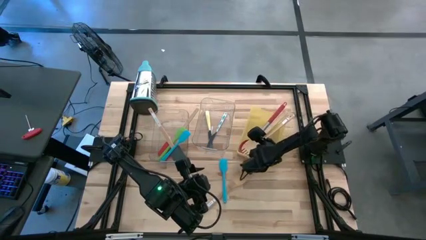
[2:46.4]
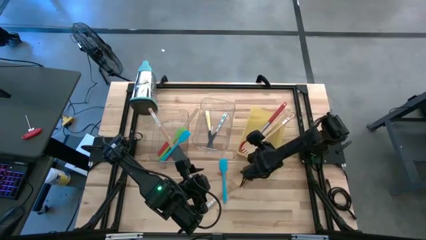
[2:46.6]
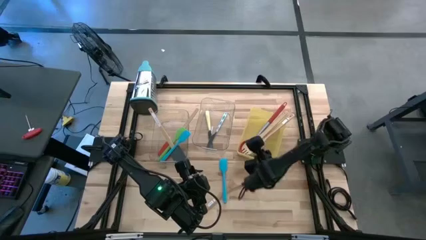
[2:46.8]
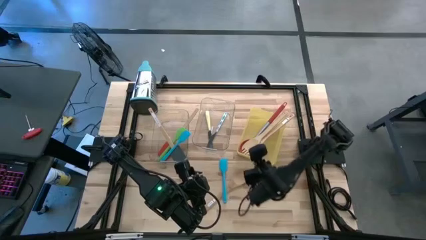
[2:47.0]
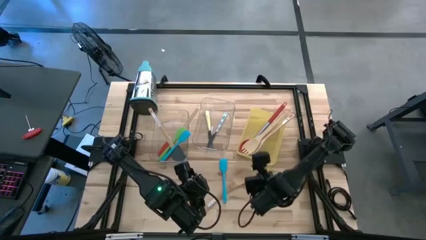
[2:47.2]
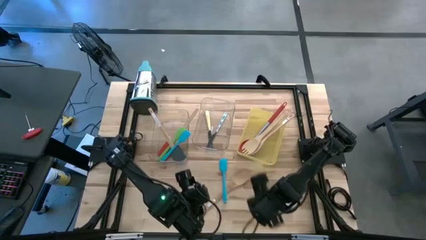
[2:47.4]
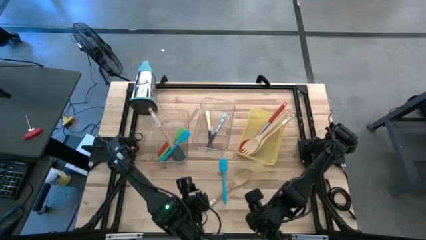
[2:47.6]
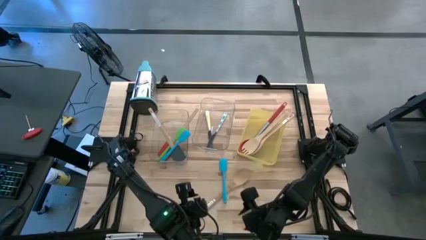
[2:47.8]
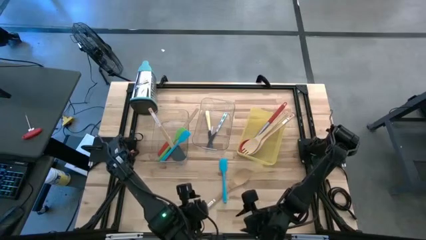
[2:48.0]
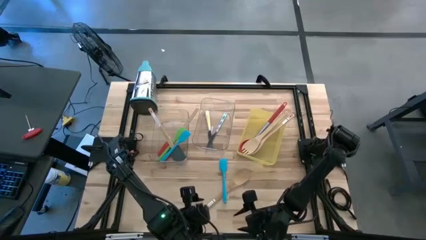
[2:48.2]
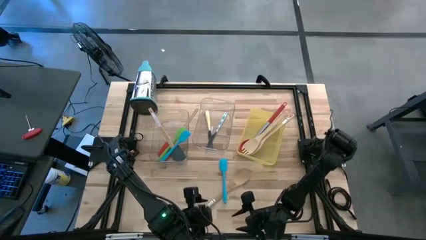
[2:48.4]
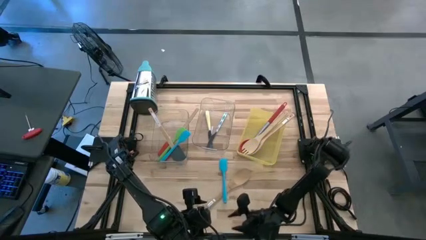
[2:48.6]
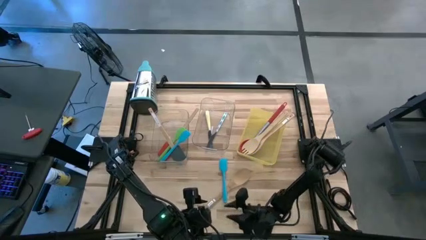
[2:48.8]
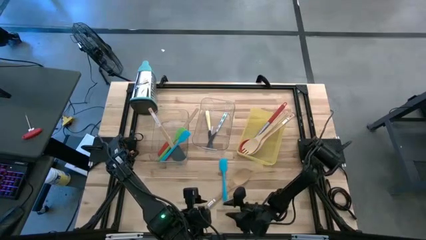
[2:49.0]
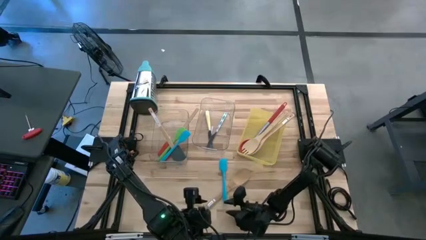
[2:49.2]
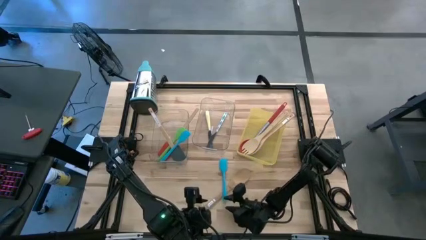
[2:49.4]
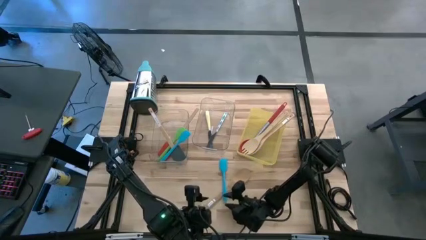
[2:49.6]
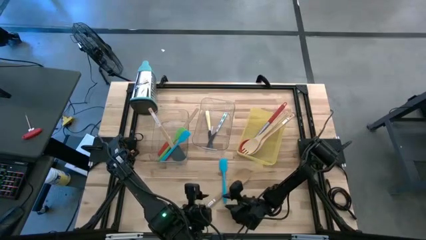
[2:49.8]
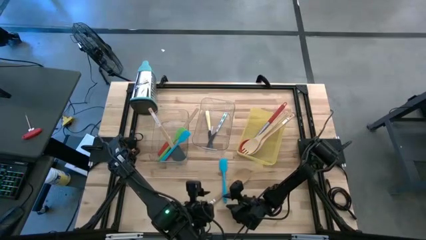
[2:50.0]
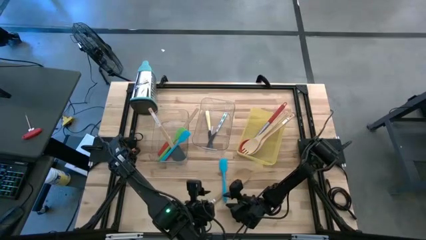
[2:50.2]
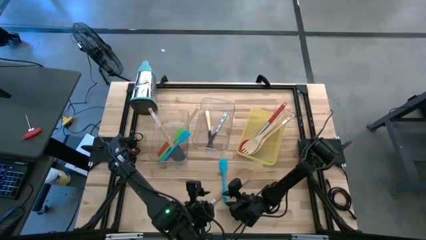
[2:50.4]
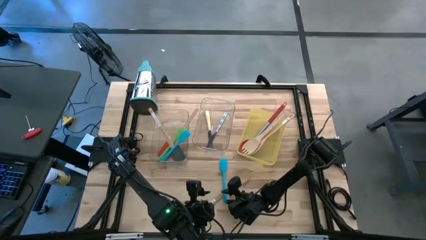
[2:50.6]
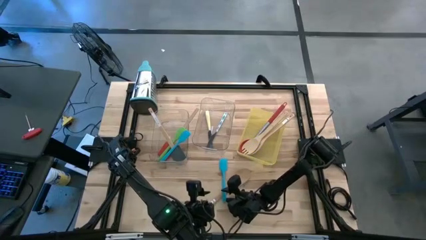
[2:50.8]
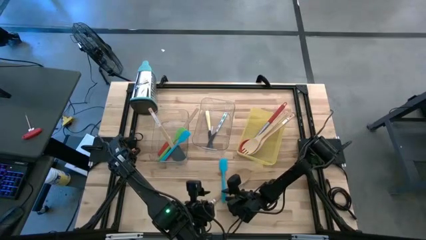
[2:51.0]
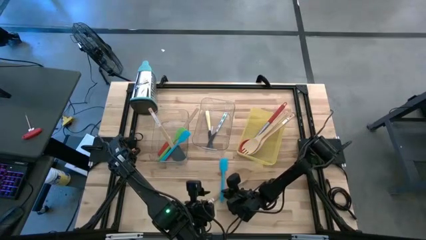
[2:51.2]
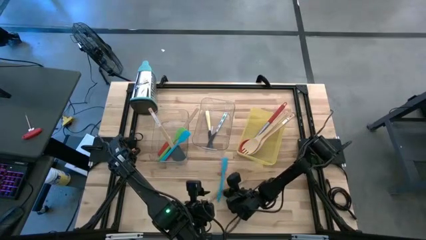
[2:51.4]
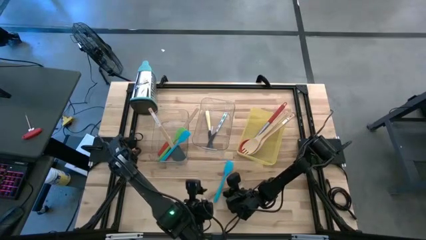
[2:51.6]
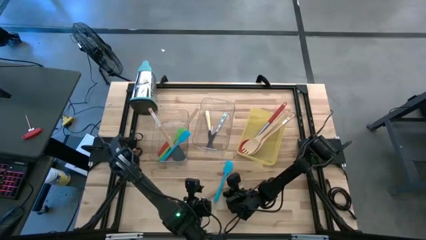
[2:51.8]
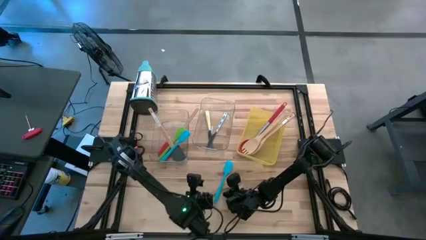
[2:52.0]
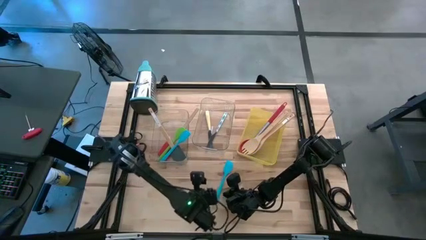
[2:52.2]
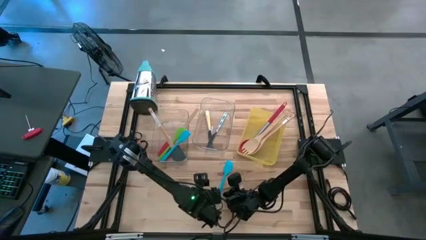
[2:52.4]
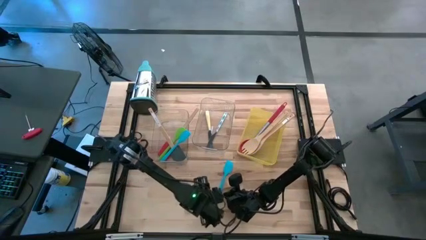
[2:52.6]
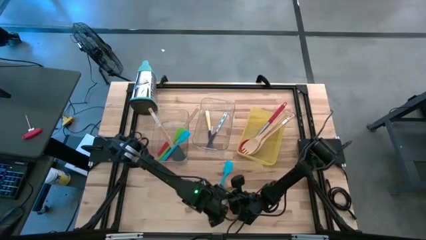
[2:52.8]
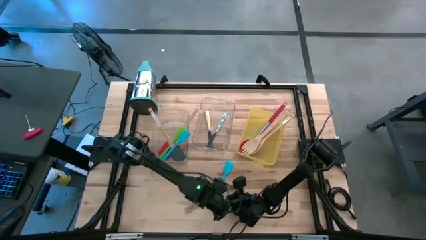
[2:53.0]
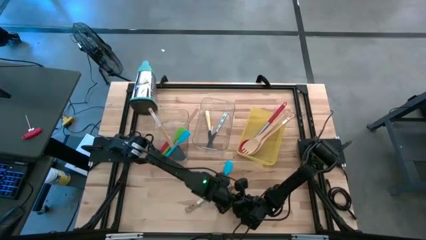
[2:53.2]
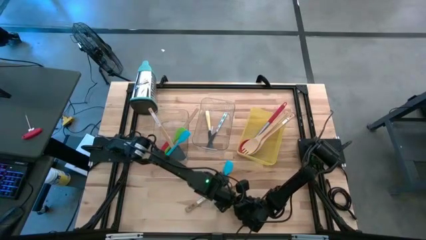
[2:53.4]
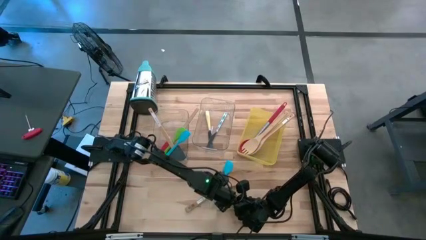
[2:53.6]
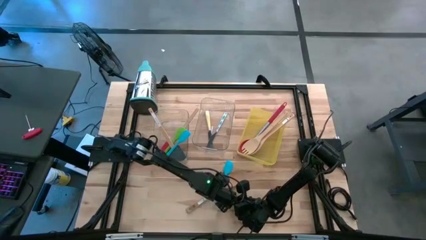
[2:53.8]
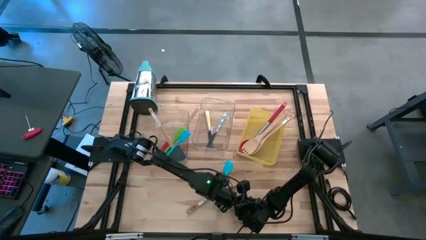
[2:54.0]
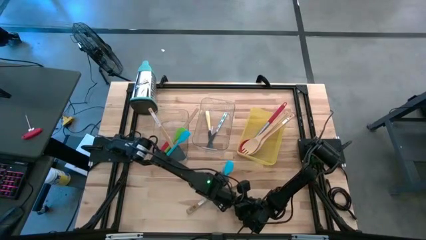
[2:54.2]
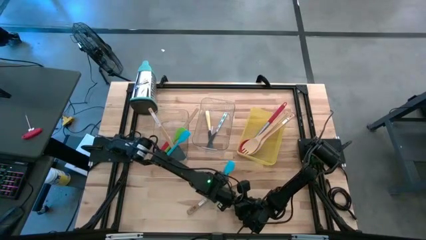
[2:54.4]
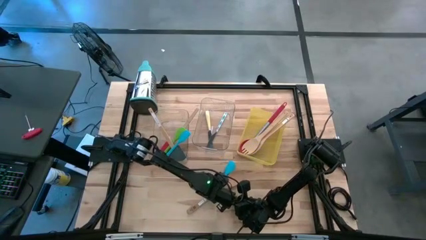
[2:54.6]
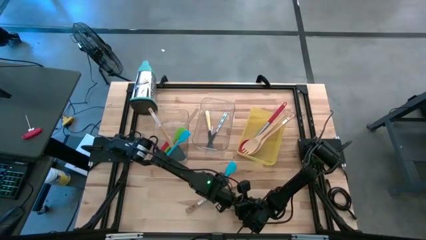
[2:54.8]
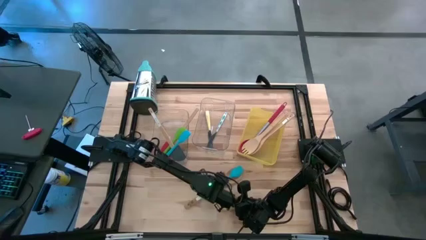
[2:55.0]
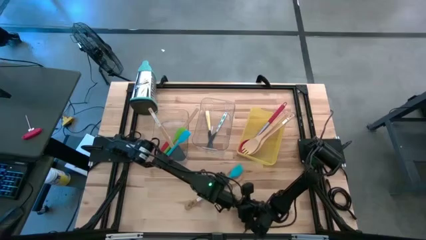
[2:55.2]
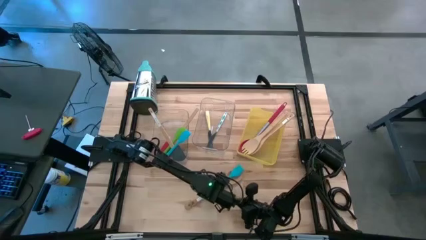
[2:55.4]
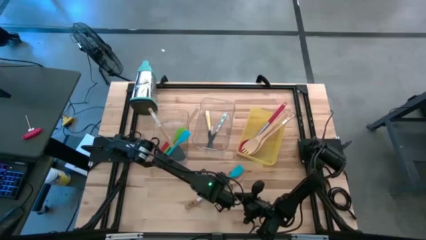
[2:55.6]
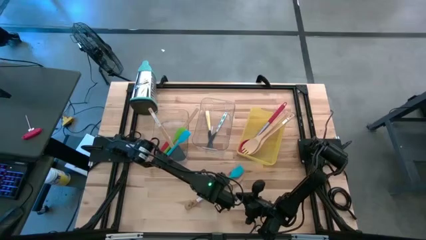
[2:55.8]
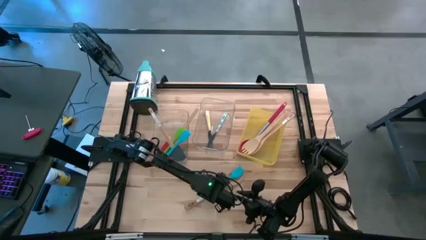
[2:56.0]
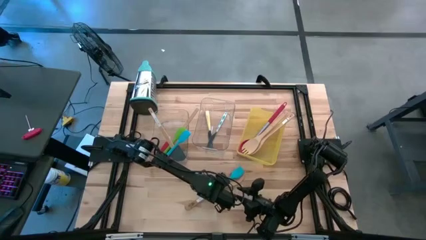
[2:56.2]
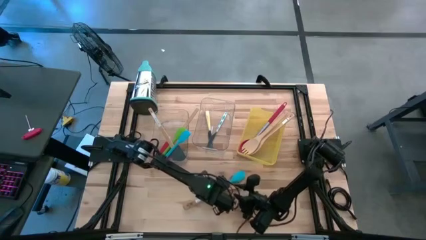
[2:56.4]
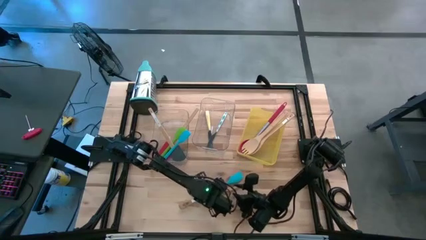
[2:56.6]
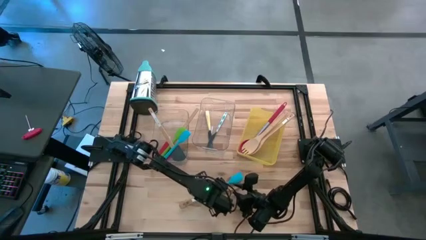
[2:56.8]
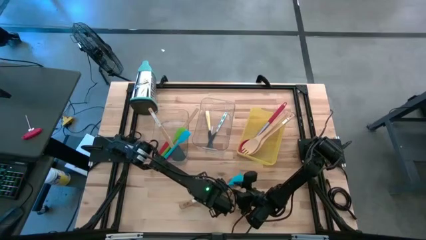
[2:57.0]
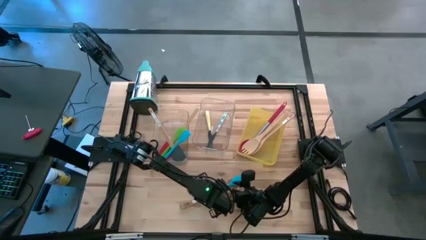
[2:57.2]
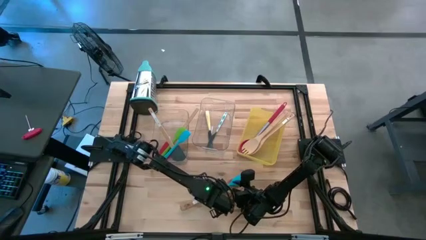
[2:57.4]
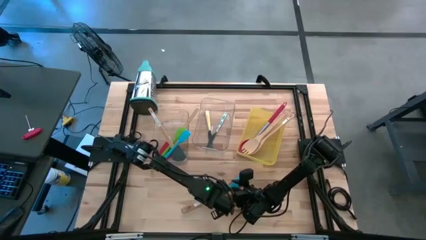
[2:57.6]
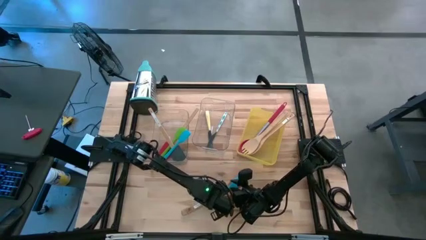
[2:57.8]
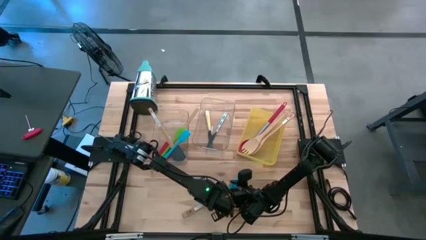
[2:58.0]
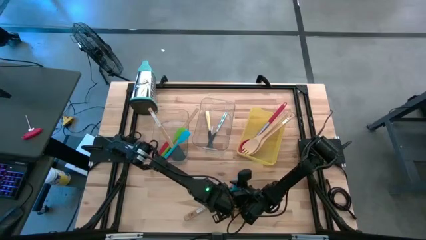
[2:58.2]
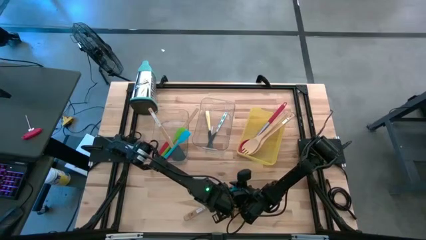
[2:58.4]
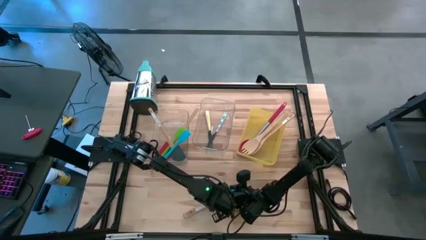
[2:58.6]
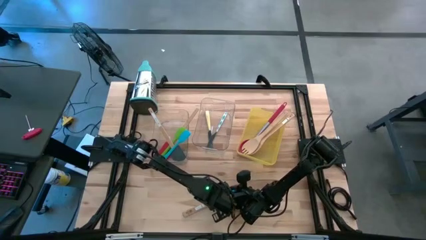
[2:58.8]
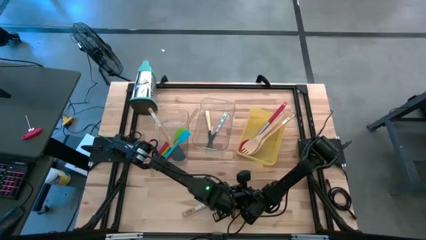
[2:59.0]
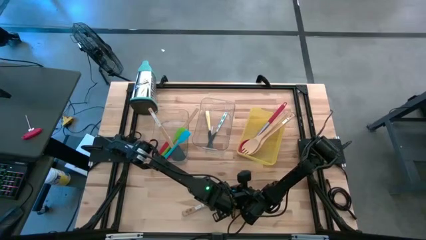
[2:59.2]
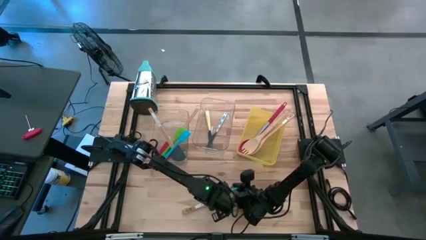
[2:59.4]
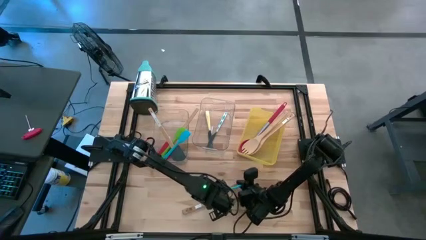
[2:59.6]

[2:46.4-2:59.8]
Task: Pick & Place Kitchen Items
Put the blue spatula into the left transparent bin
